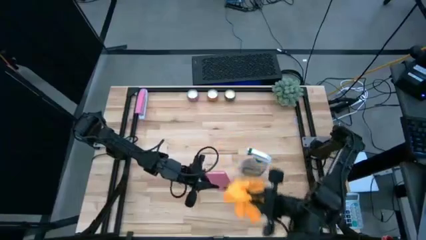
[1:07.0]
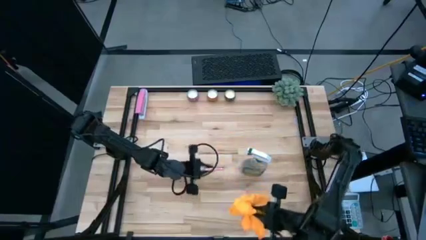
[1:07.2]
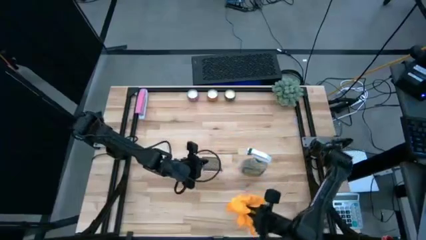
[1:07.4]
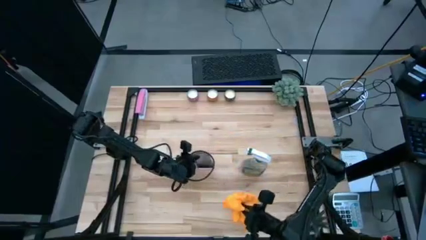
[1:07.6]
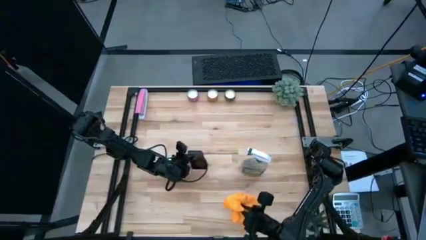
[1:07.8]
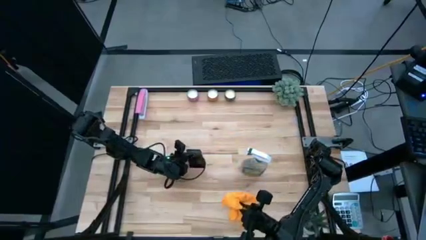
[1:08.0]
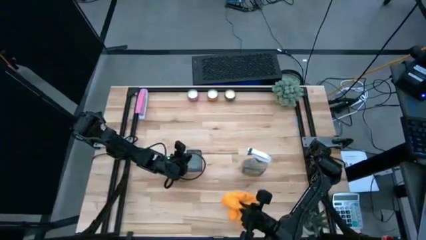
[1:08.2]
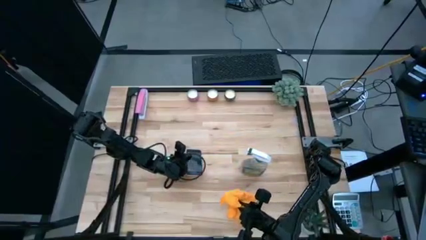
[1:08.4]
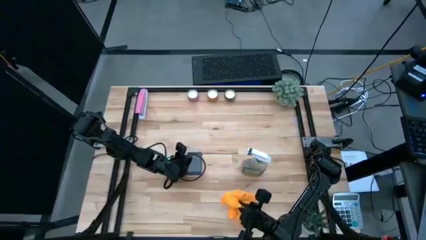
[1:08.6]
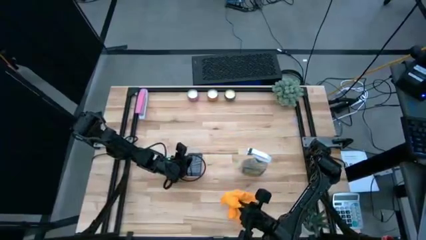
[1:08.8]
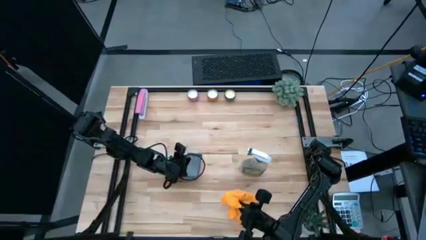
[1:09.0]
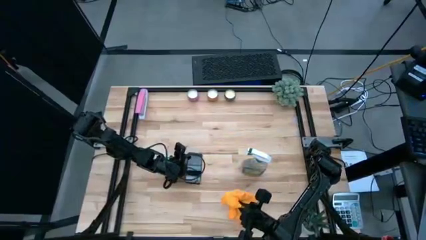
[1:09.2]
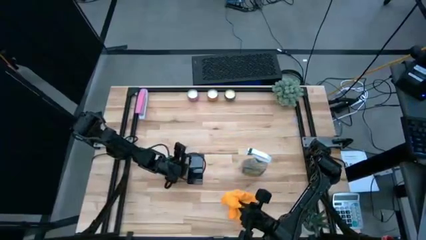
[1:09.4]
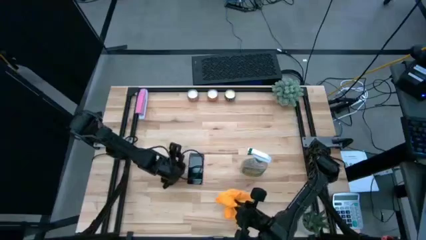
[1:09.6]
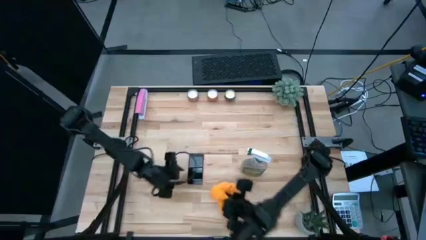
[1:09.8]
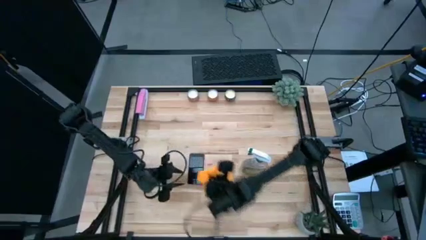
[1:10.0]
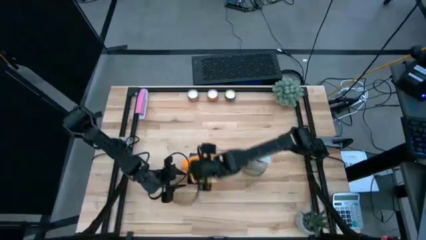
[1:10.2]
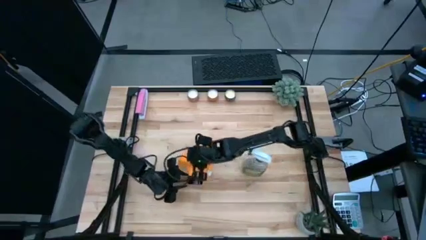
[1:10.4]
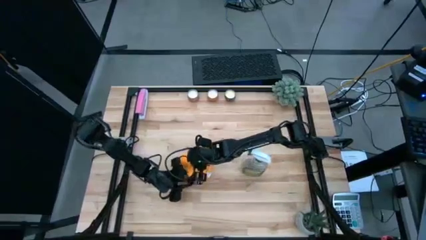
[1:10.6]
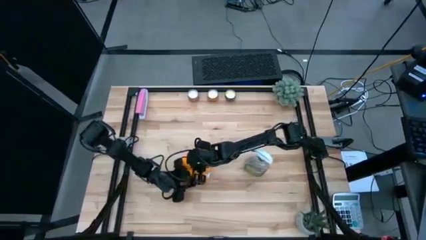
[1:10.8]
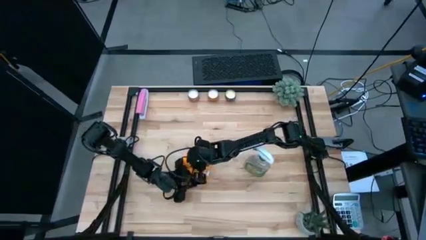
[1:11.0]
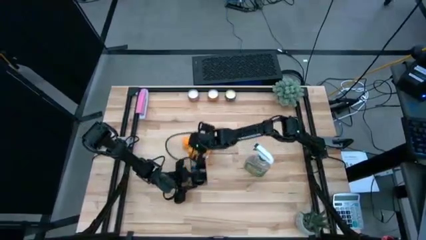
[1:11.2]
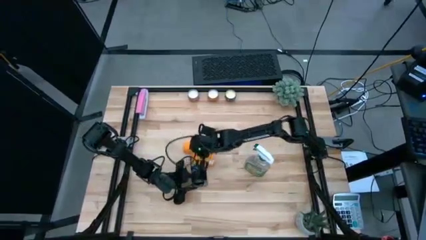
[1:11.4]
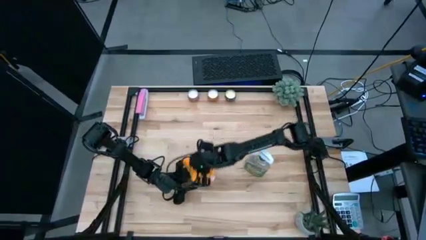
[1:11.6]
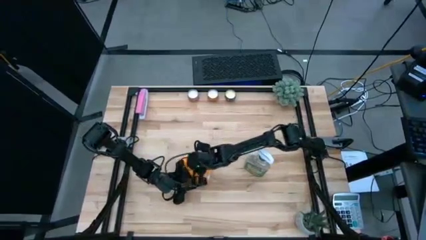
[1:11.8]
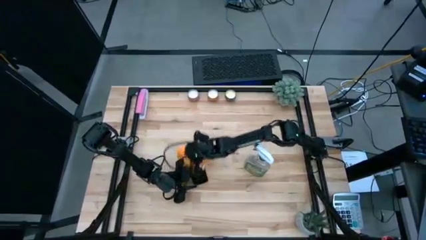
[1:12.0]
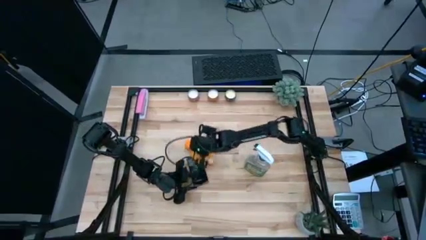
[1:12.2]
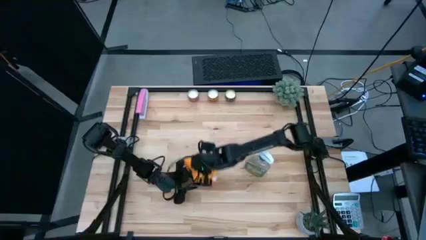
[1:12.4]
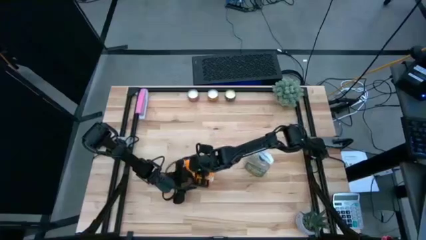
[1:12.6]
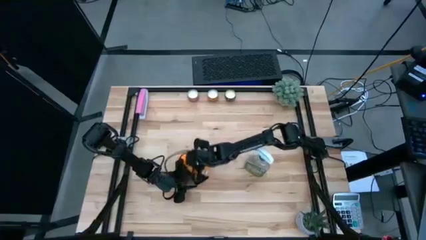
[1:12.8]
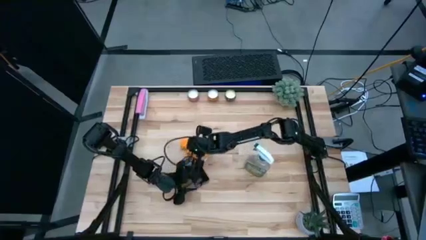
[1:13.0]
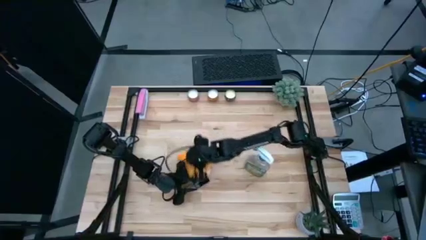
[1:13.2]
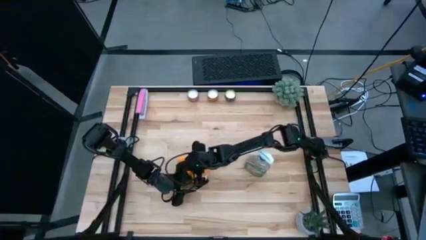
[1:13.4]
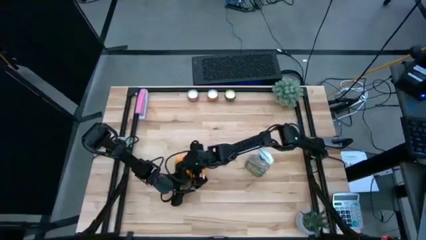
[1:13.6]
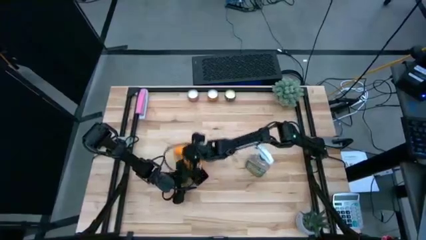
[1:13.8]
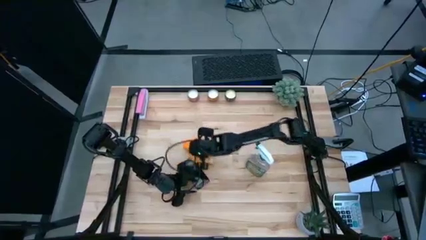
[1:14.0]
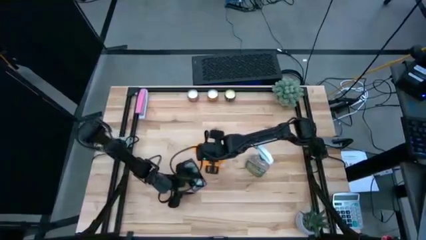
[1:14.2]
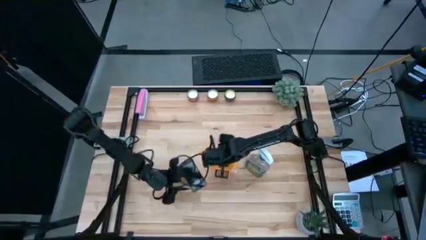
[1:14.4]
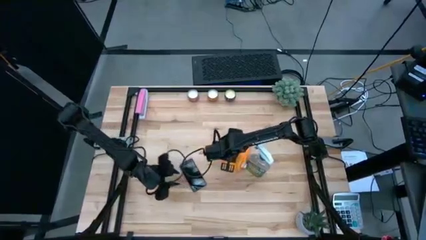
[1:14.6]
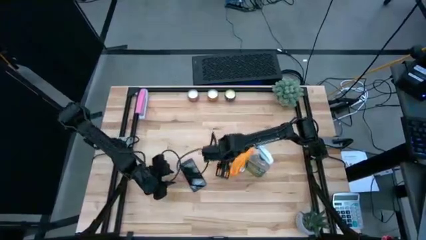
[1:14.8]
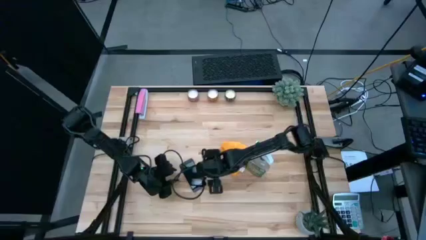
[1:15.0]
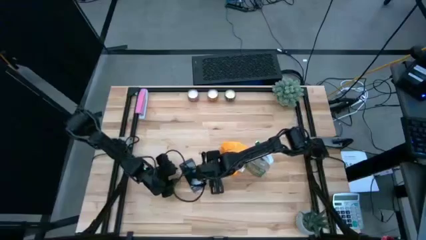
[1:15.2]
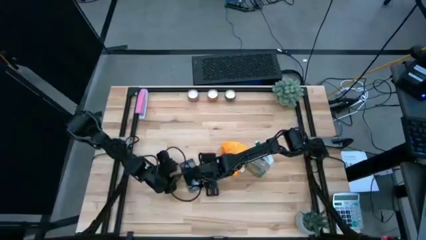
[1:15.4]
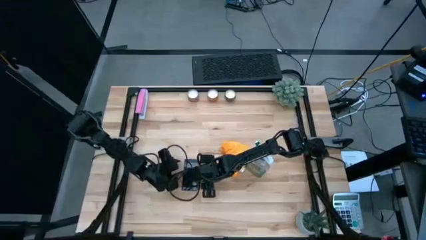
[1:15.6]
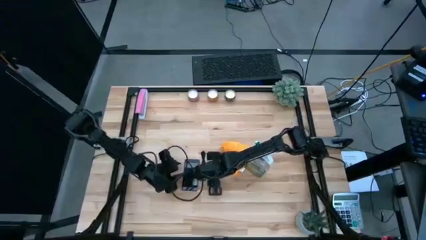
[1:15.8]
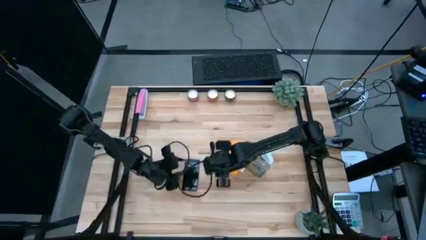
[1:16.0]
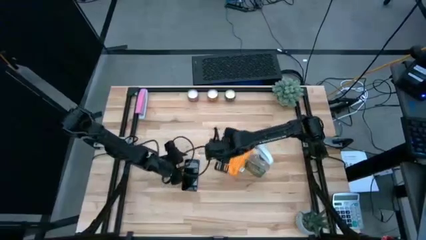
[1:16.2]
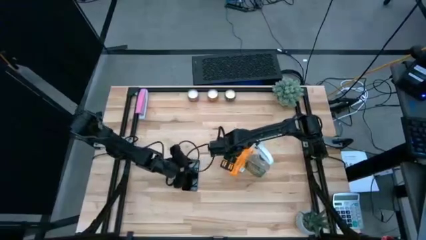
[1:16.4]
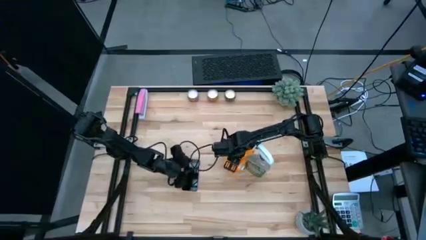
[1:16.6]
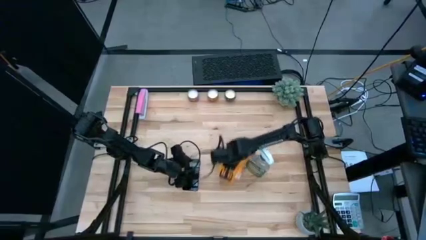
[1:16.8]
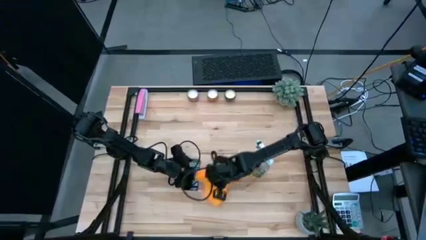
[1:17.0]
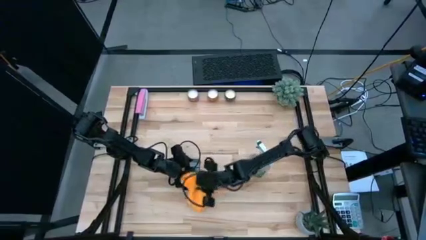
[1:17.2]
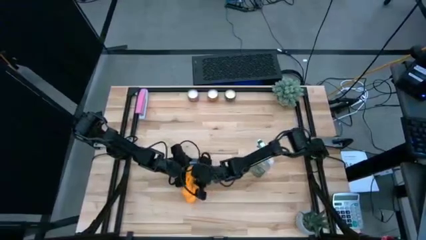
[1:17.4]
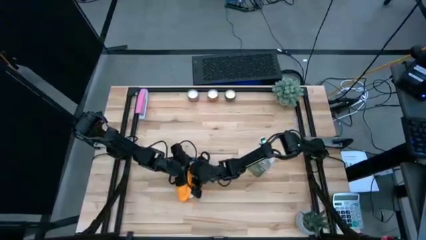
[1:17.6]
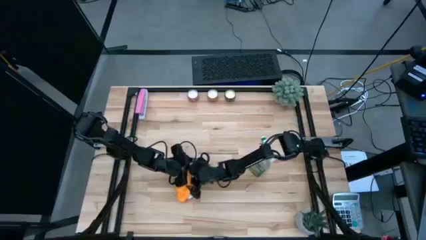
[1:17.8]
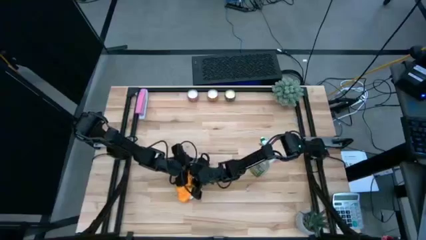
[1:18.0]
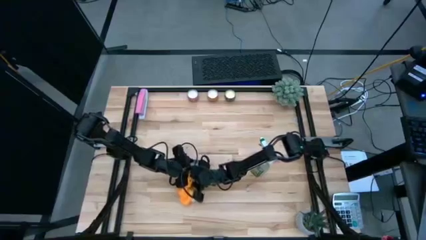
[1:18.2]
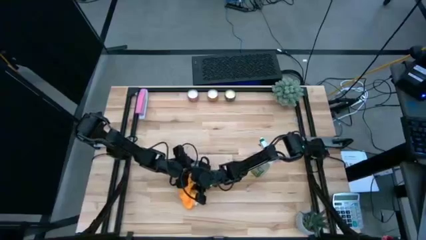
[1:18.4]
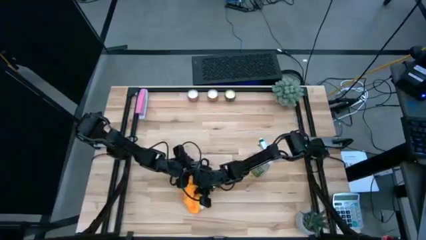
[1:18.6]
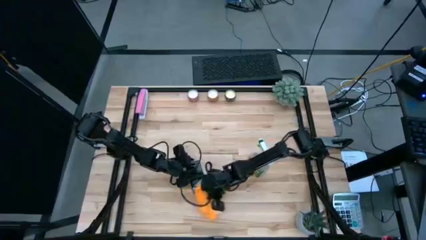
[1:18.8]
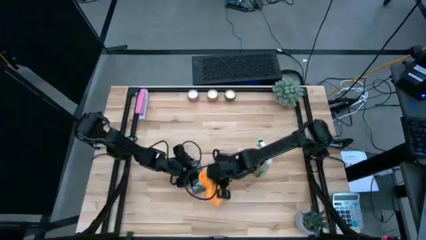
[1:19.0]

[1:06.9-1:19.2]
Task: Apply microfiber cloth
Wipe the front side of the pink cellphone using the orange microfiber cloth

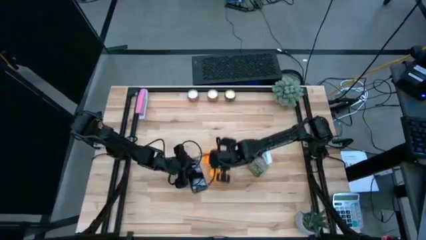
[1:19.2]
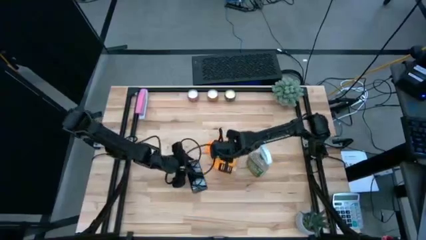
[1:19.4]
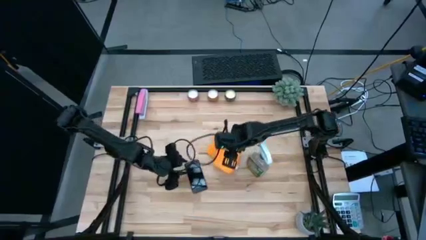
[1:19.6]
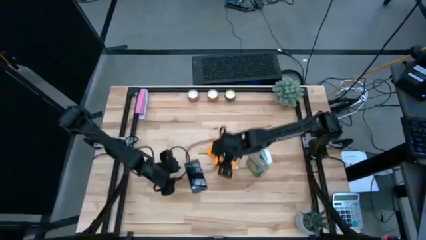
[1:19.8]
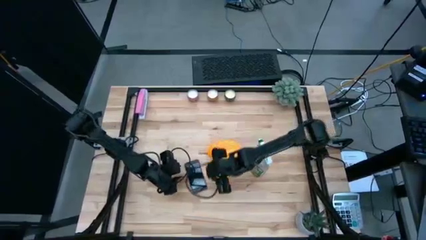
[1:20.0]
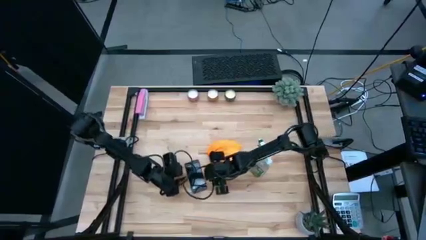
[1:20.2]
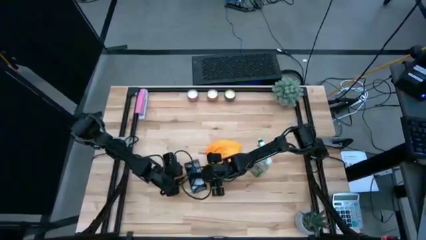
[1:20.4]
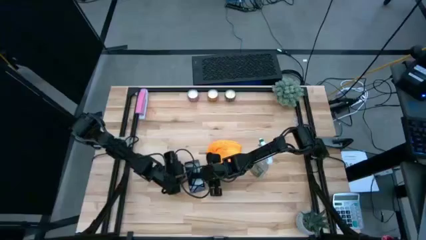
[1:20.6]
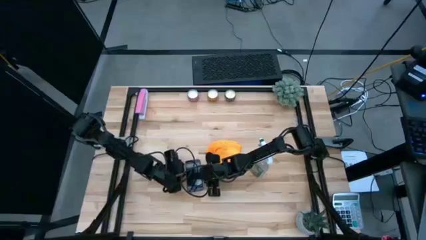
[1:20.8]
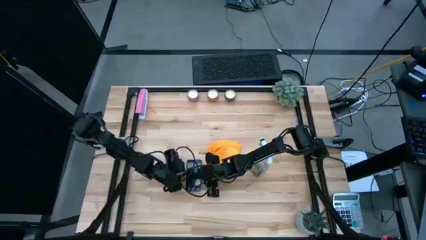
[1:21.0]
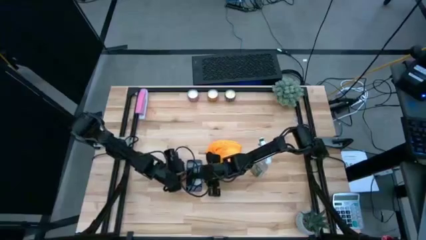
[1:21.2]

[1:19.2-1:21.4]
Adjust the pink cellphone
